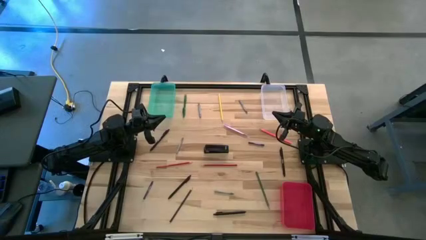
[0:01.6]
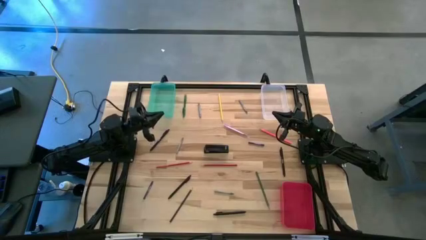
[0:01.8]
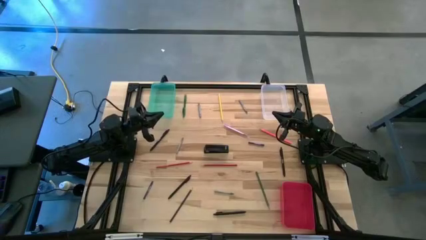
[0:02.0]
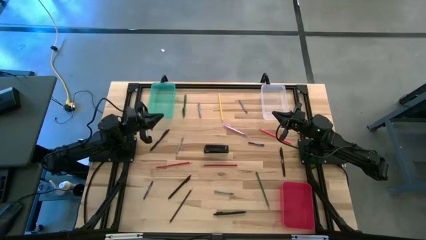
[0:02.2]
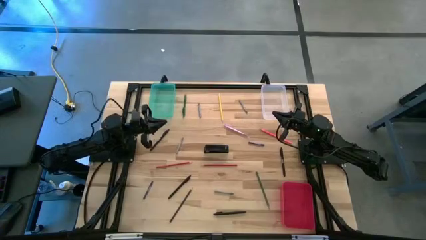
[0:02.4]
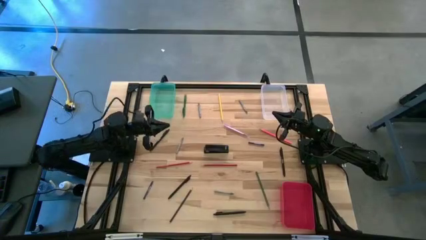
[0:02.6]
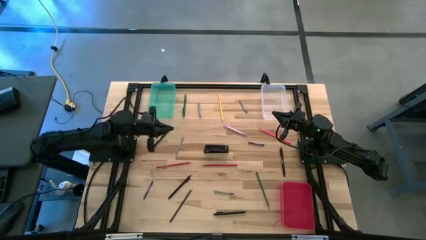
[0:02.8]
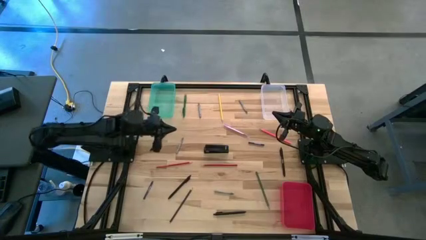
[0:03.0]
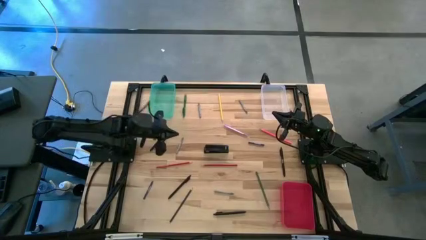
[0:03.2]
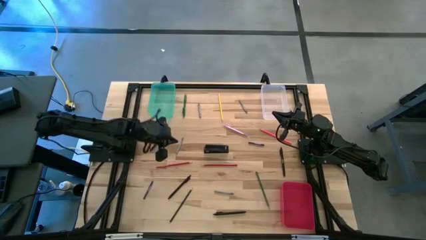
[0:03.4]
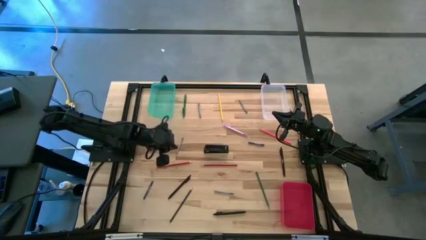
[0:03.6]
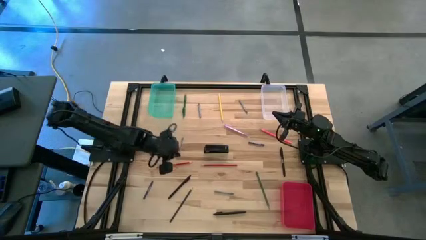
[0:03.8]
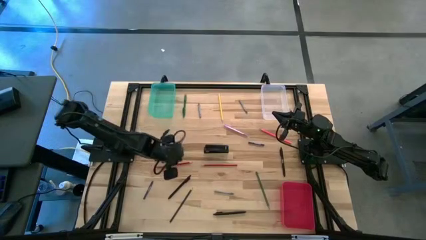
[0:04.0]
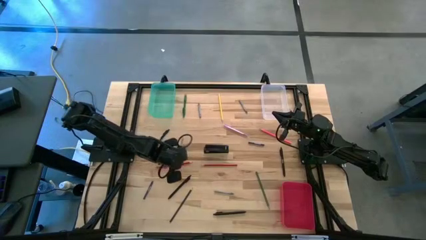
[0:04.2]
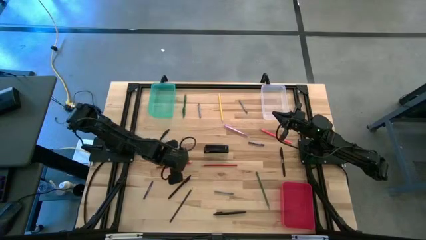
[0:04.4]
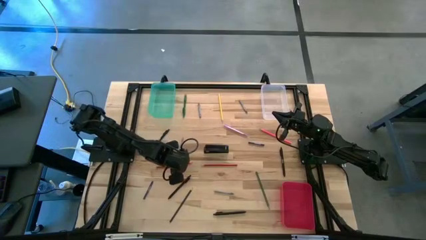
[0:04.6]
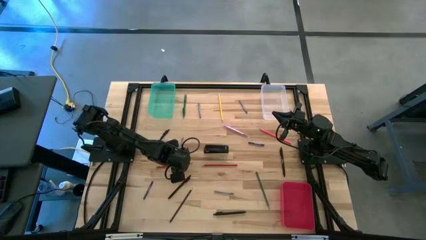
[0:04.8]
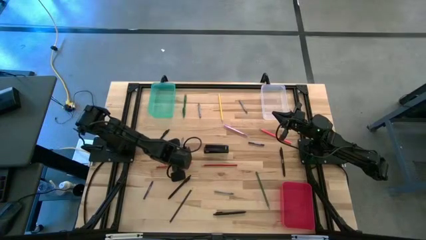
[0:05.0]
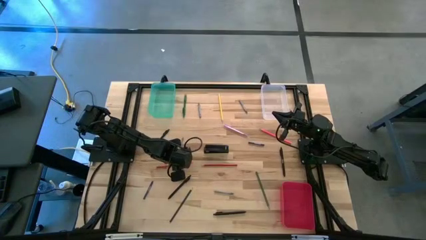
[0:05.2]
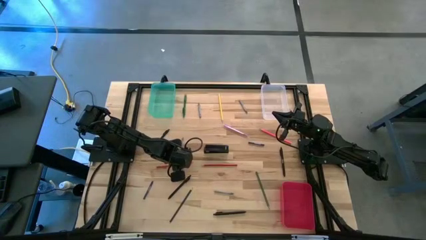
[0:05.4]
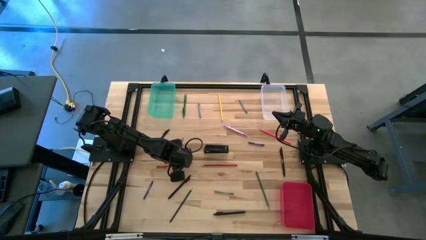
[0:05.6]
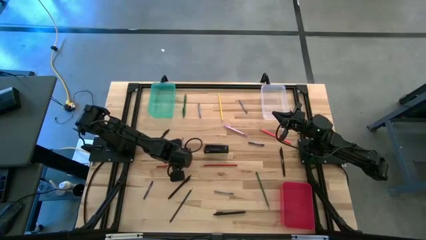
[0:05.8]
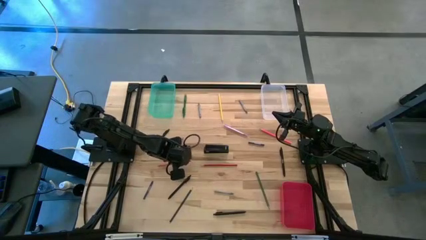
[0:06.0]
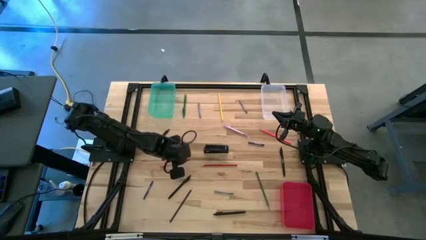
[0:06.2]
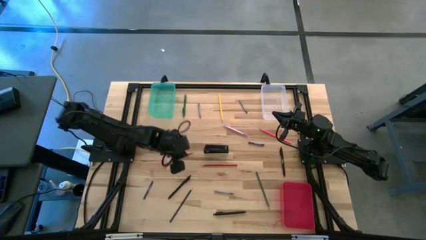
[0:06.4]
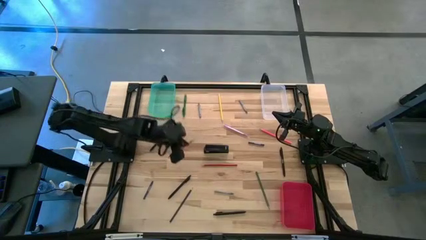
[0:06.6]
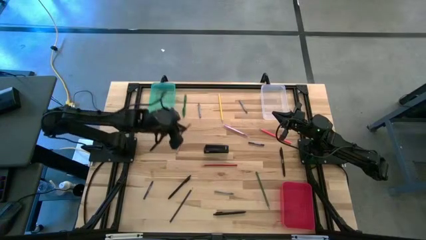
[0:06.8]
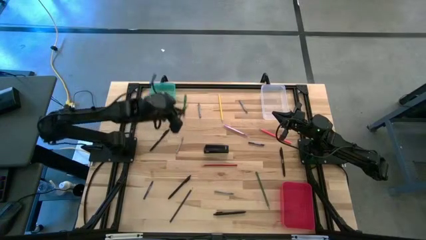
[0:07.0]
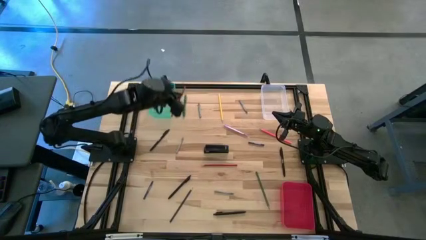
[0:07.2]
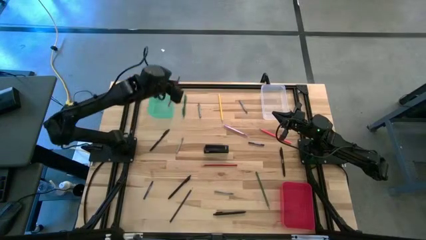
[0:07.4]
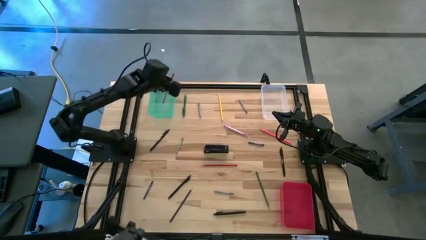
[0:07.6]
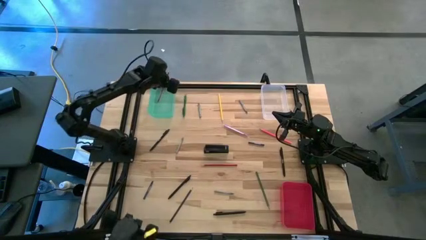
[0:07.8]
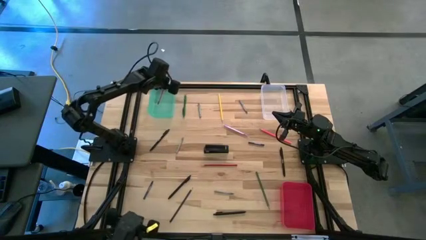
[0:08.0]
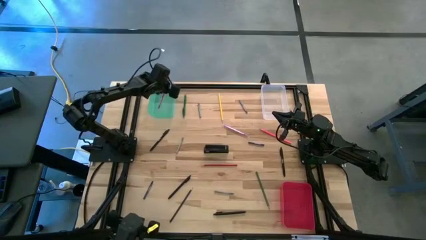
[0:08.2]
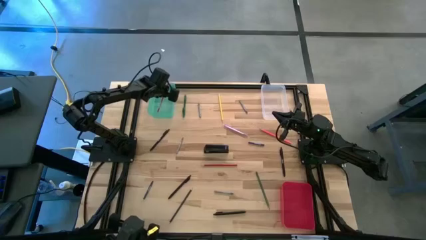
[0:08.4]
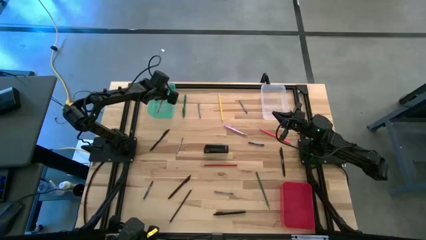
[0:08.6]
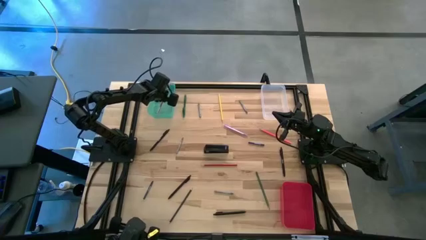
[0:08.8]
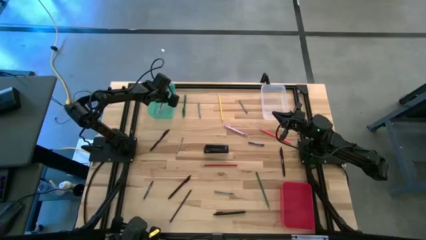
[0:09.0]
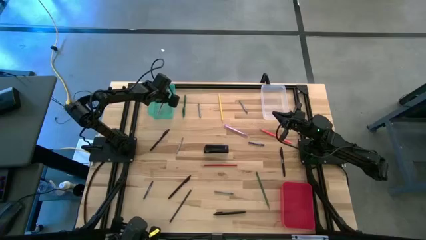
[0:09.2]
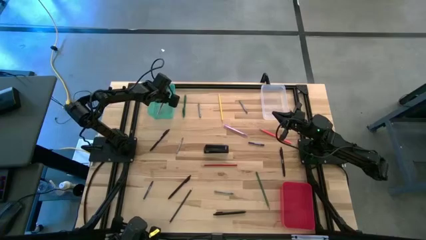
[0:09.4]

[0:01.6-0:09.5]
Task: Sort crayons/erasers/pens/pencils in bins
Put the red pencil into the green bin

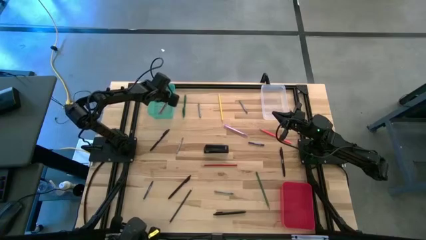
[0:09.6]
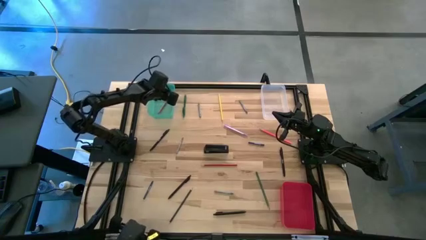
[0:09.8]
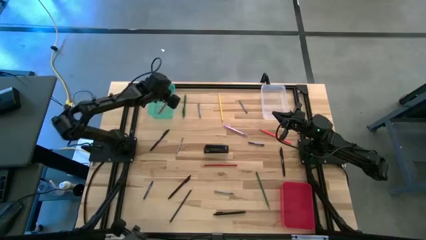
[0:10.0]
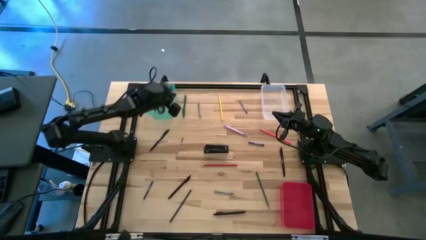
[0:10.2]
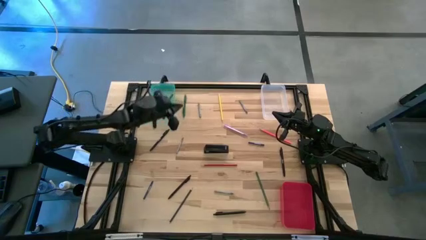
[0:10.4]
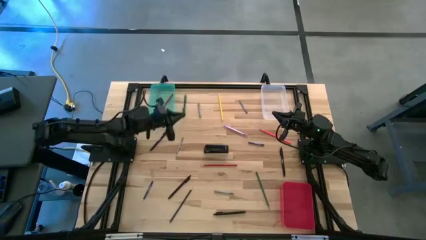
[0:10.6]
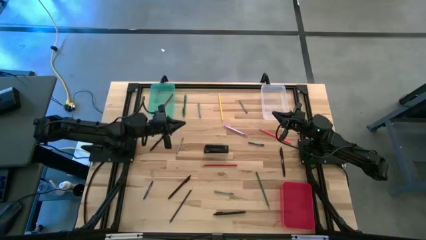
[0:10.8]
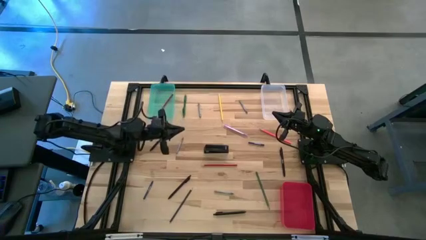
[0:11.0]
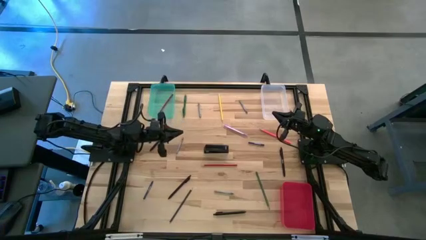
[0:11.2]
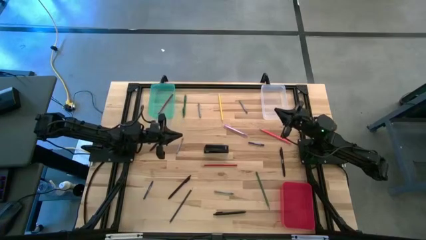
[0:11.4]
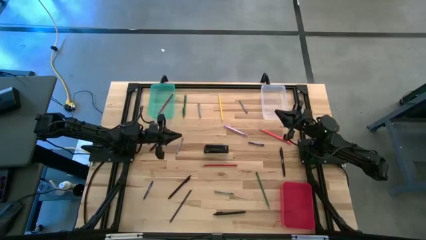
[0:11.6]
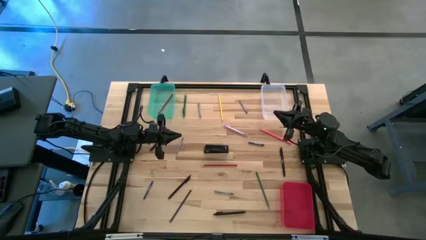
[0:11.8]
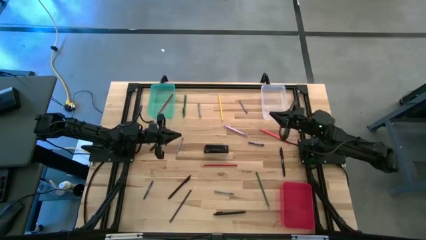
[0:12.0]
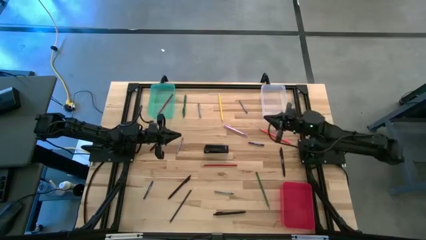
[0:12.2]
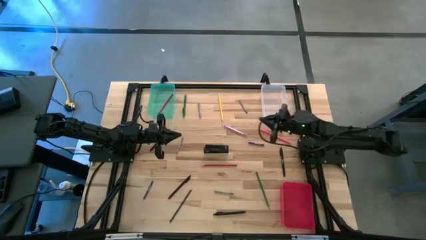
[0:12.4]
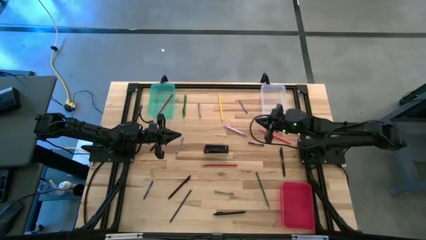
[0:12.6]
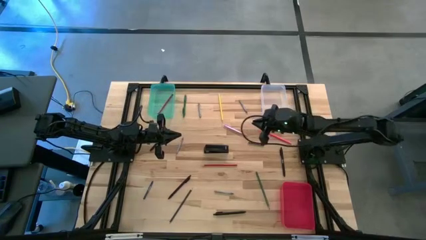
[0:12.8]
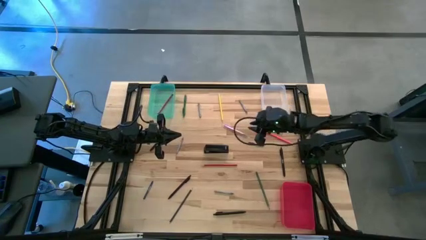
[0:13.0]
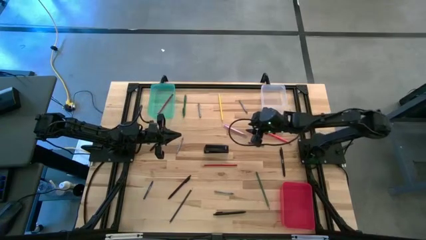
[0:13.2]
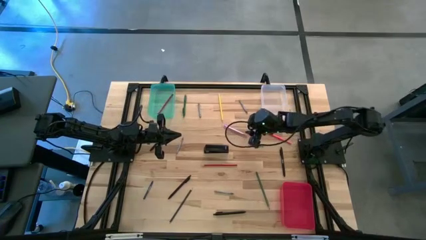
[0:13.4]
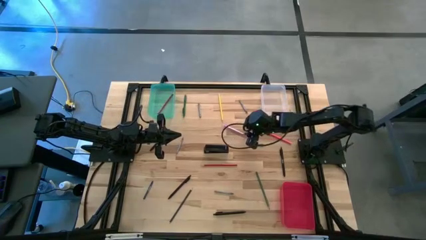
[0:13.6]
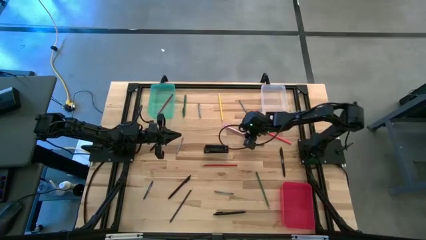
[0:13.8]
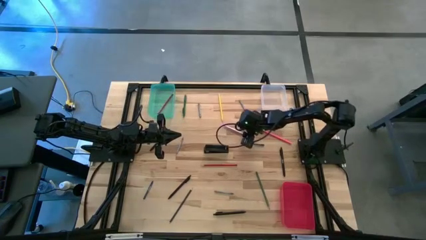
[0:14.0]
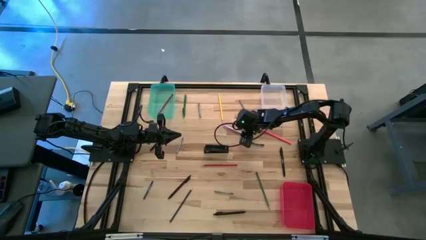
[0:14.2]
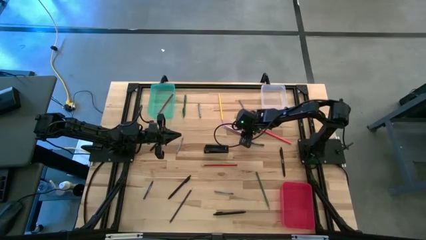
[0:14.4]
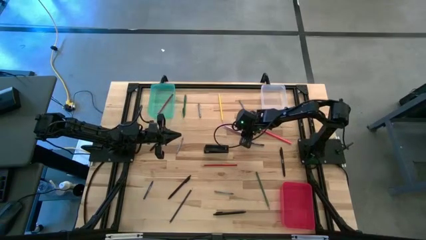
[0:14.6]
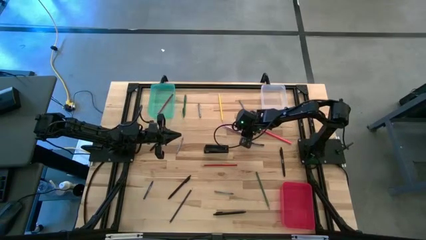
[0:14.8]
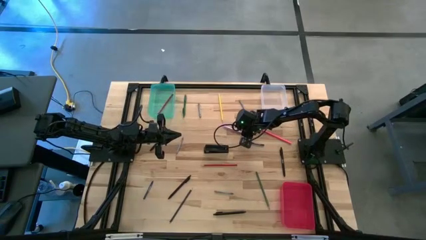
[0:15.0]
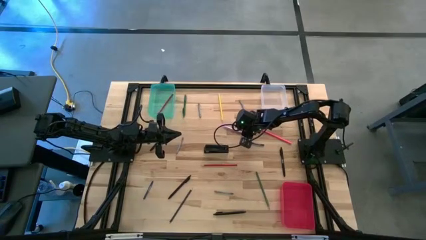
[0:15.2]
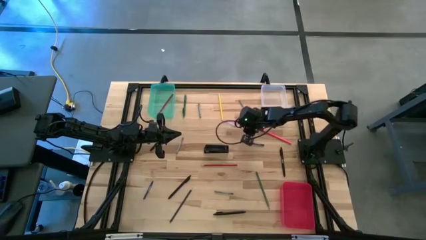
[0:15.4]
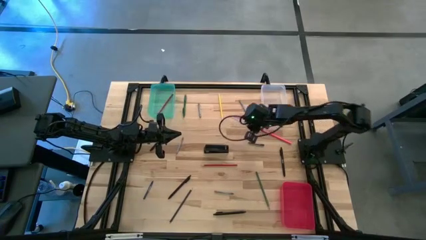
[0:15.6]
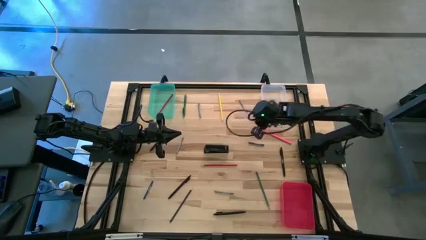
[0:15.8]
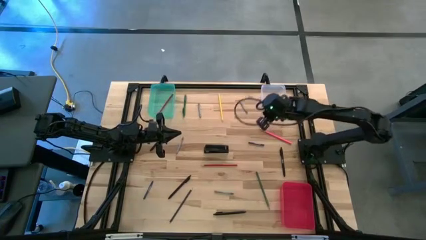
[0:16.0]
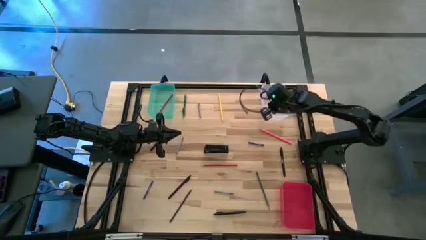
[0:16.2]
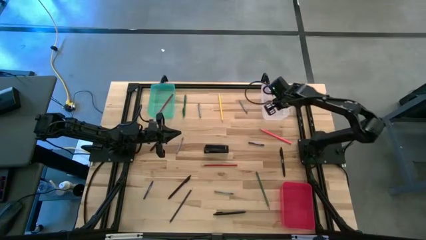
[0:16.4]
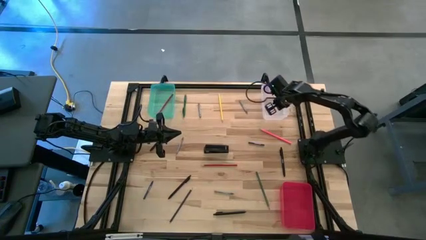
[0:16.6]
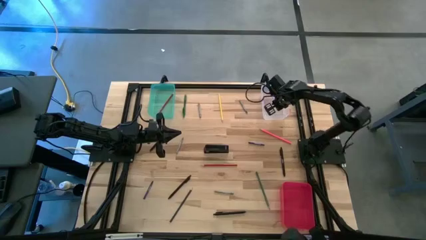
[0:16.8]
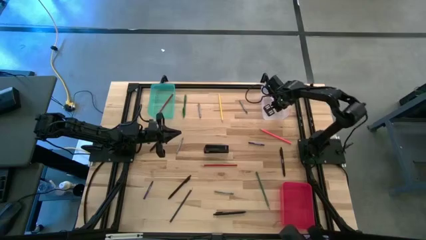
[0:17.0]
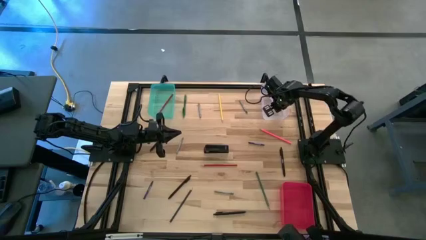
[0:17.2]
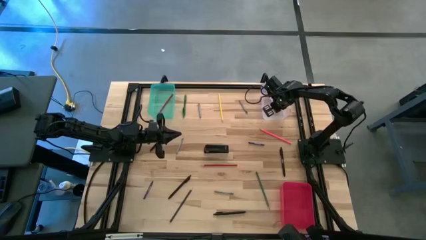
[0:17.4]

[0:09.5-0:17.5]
Put the purple pen into the transparent bin
